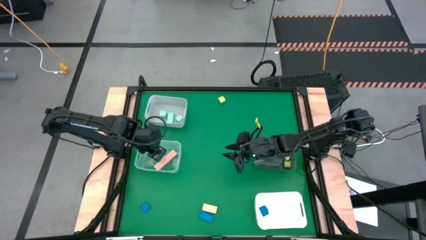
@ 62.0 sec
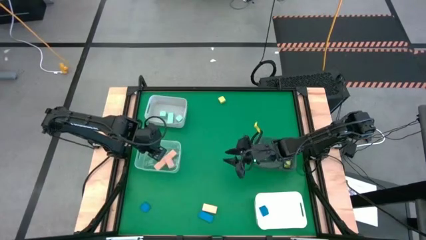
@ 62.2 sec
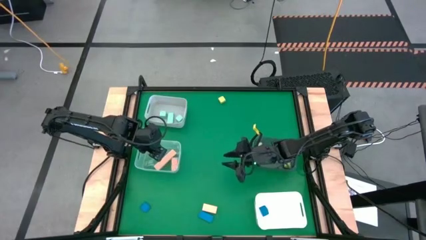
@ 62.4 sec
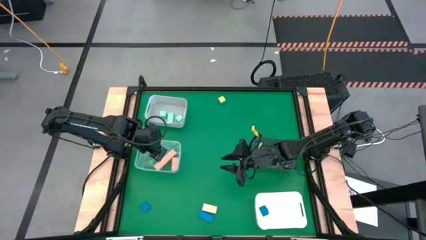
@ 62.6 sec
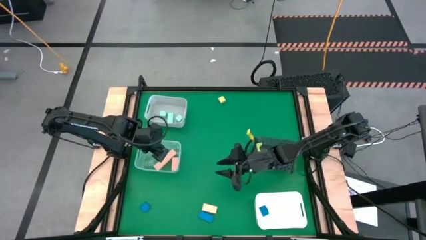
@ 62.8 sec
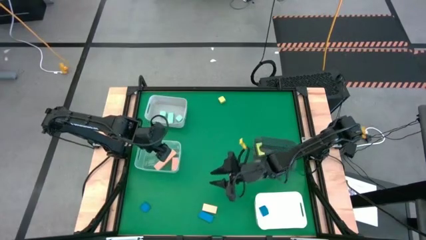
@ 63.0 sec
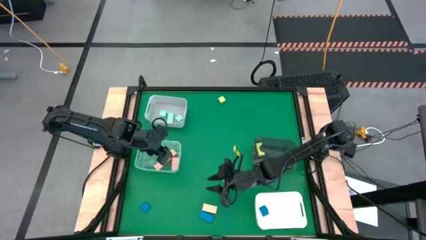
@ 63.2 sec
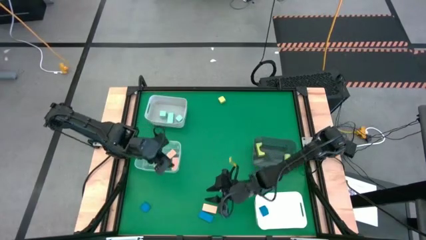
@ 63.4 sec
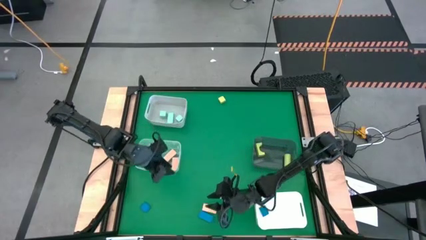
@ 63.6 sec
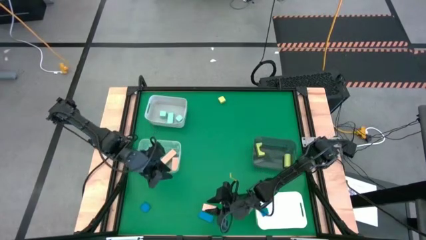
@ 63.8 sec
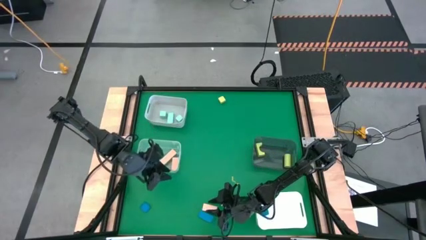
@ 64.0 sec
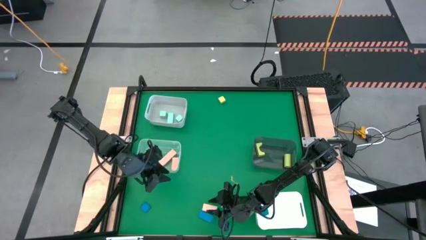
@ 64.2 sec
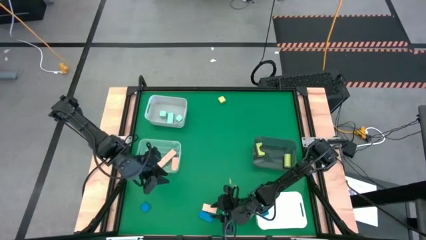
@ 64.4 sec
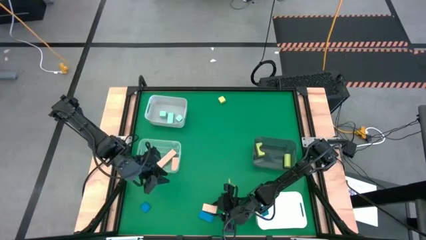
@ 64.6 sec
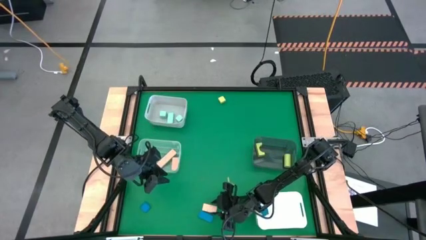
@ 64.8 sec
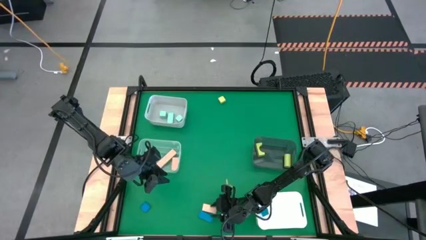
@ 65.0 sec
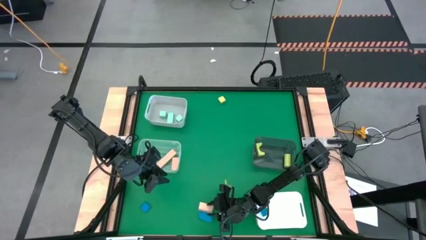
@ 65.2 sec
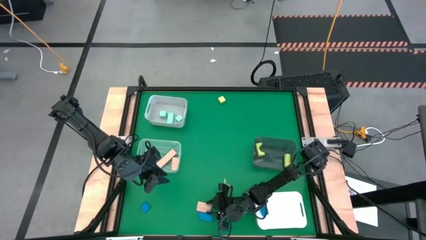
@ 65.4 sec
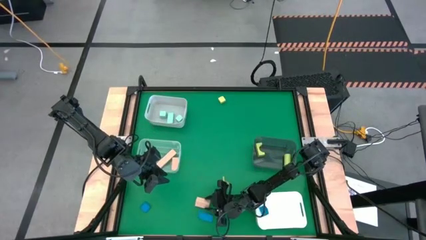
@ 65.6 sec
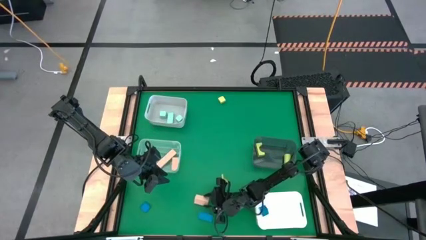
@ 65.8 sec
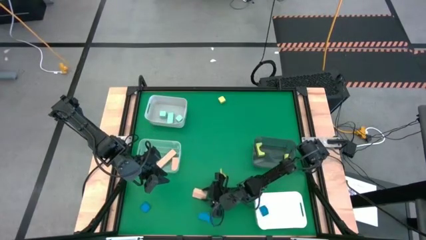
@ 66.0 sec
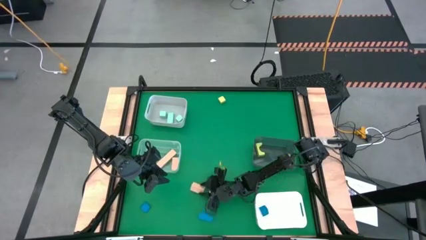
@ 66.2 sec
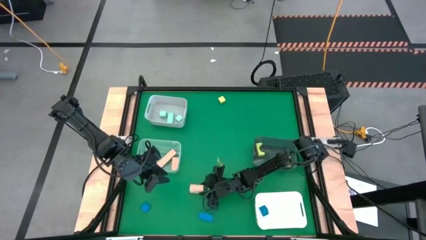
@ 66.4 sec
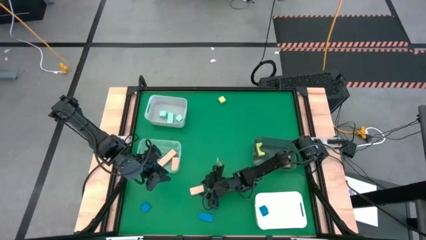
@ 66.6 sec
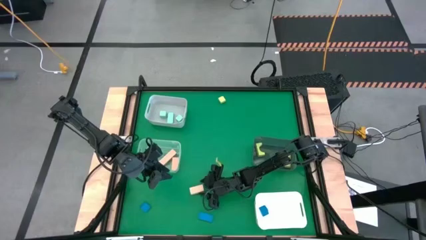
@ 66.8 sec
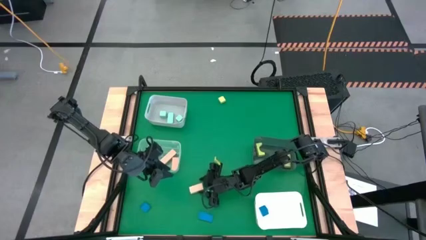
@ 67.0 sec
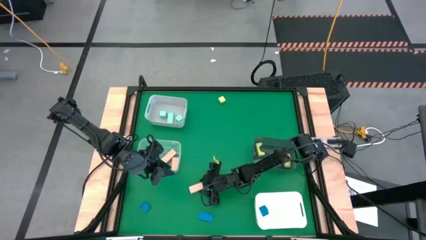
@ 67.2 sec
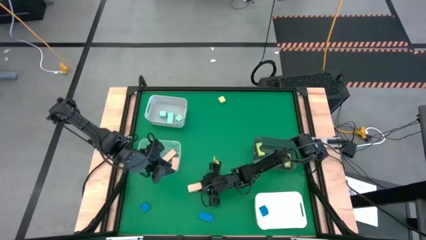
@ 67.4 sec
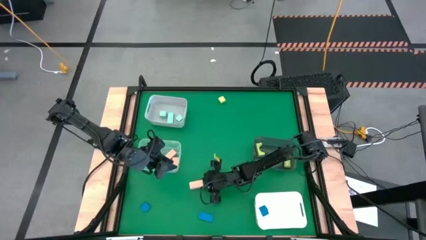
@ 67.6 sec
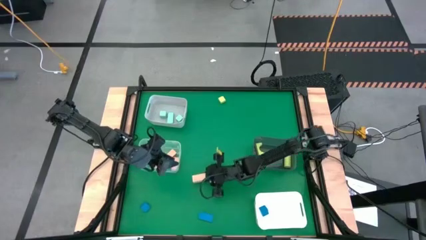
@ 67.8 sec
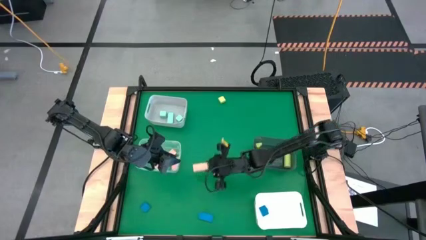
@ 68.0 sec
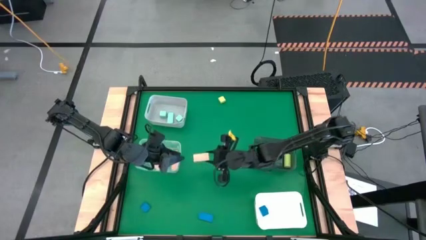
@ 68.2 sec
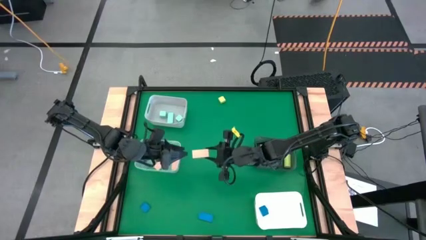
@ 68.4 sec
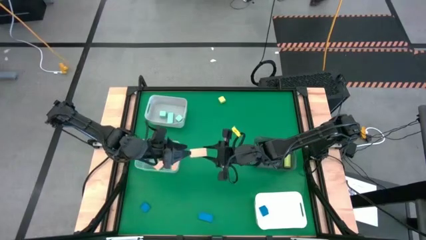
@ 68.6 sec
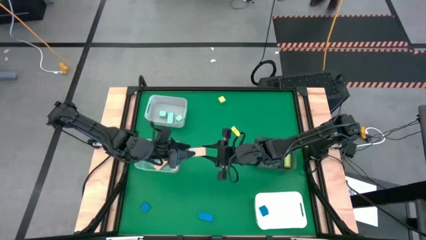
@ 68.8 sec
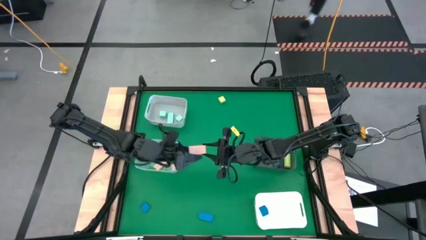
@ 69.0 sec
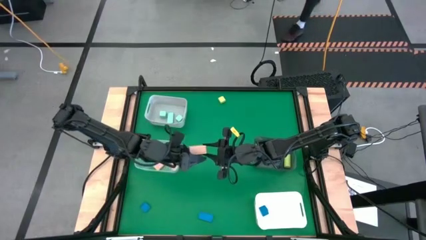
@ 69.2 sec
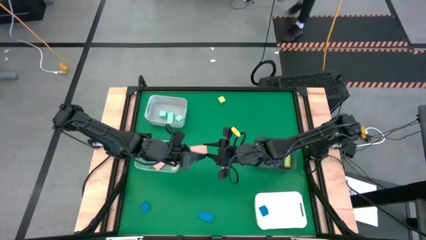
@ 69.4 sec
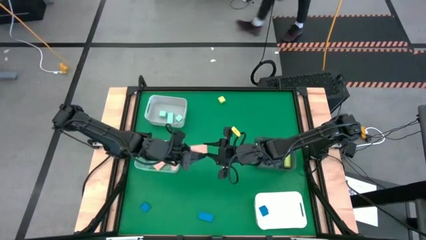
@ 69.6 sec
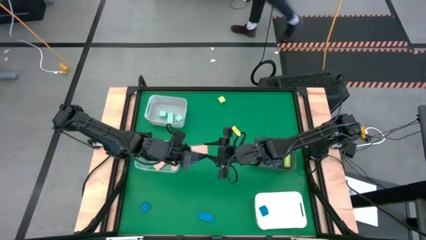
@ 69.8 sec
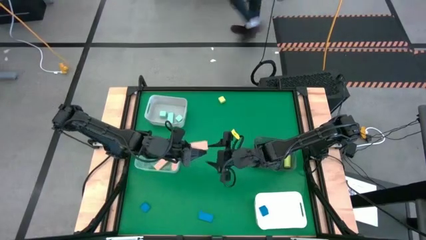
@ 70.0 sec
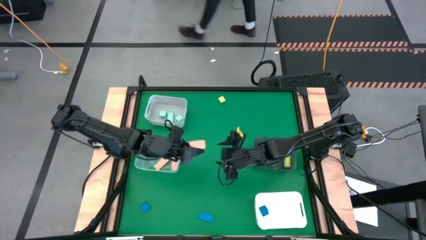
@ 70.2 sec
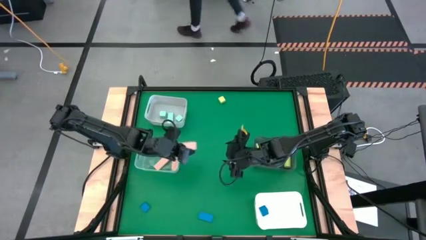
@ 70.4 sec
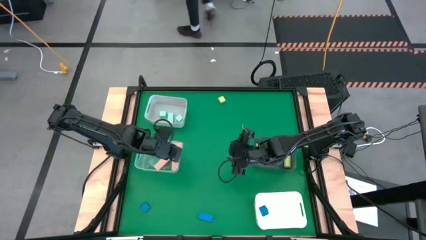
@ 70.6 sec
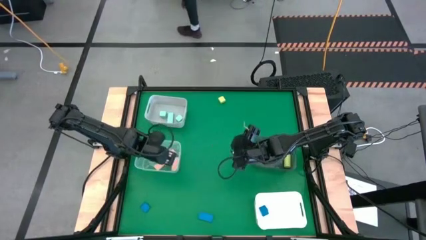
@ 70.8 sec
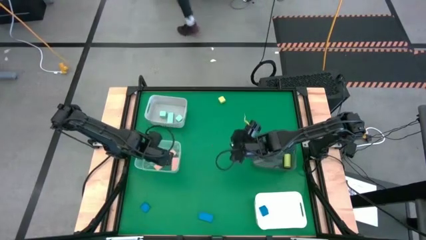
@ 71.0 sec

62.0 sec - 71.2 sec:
Task: Sort & place blocks by color
Put the brown block into the transparent bin

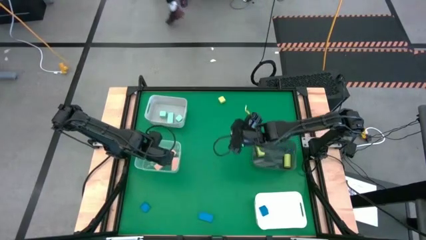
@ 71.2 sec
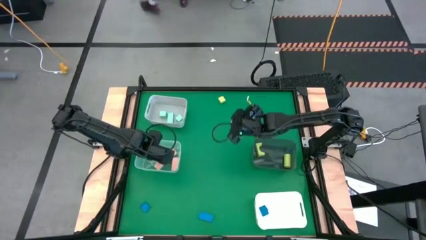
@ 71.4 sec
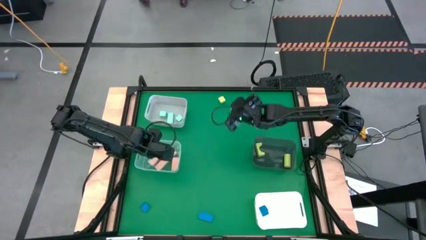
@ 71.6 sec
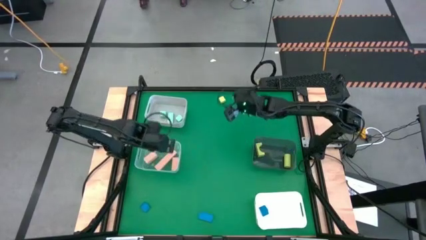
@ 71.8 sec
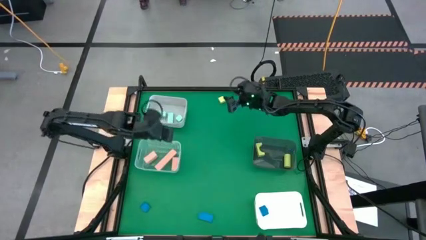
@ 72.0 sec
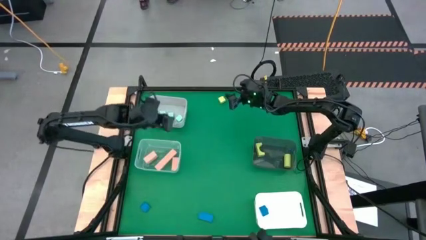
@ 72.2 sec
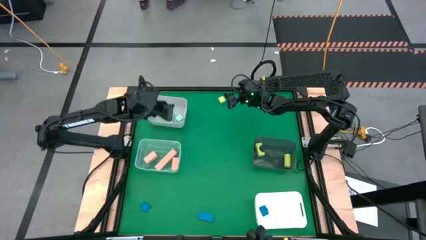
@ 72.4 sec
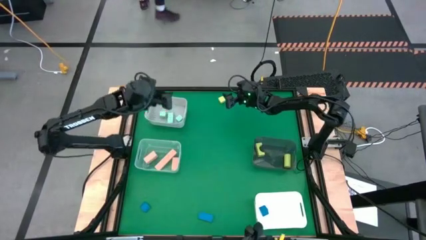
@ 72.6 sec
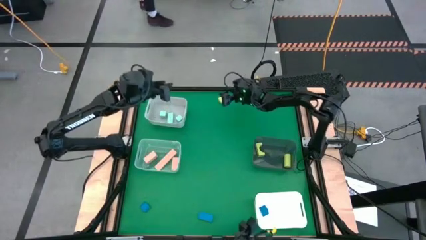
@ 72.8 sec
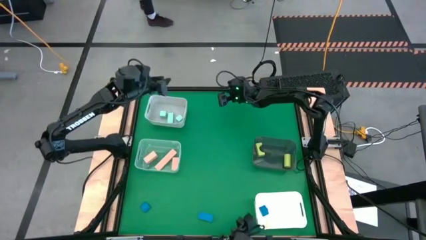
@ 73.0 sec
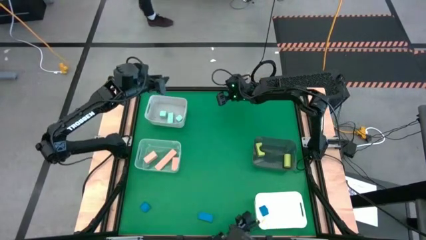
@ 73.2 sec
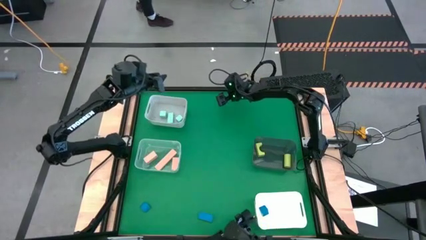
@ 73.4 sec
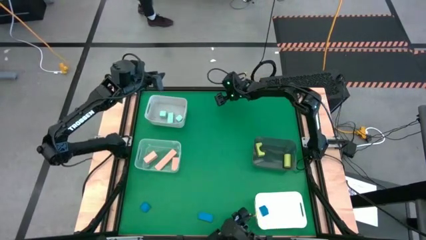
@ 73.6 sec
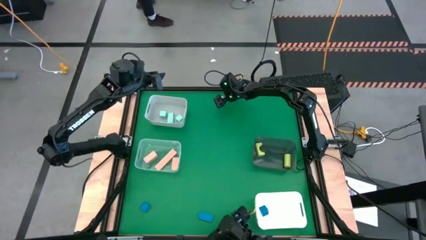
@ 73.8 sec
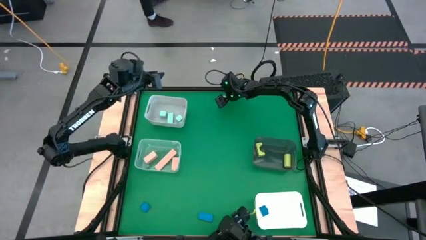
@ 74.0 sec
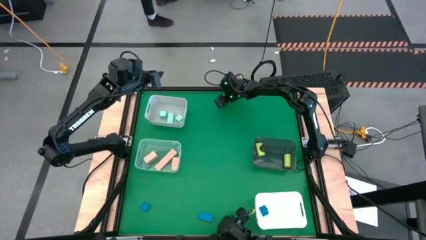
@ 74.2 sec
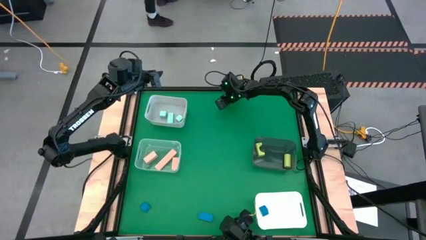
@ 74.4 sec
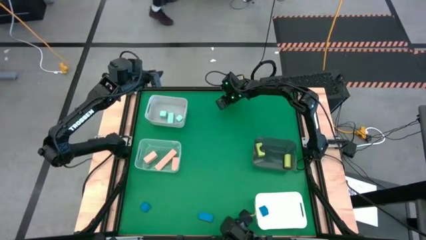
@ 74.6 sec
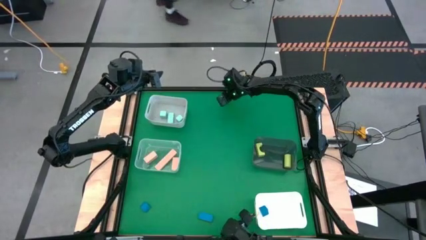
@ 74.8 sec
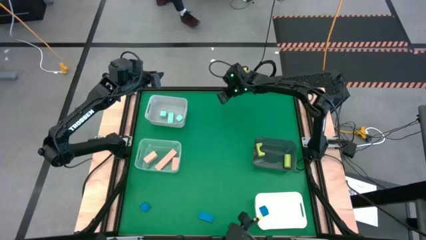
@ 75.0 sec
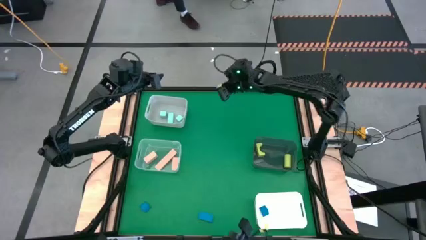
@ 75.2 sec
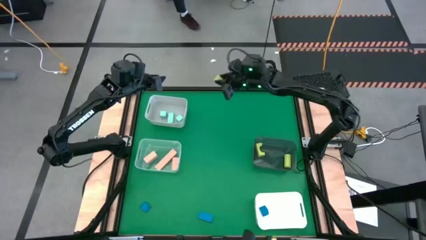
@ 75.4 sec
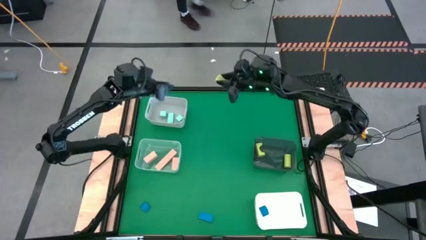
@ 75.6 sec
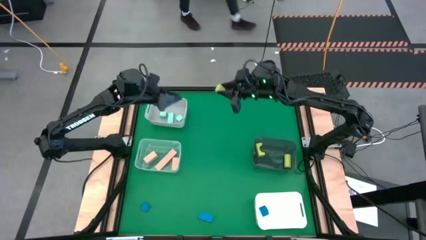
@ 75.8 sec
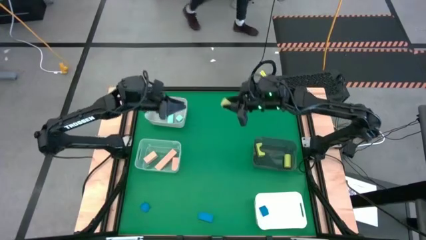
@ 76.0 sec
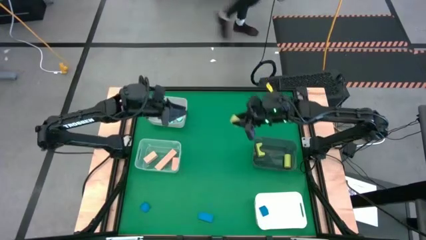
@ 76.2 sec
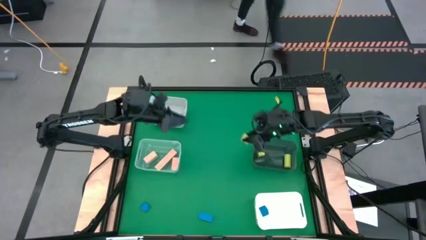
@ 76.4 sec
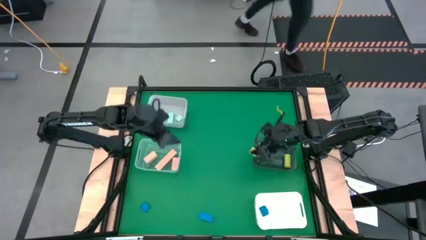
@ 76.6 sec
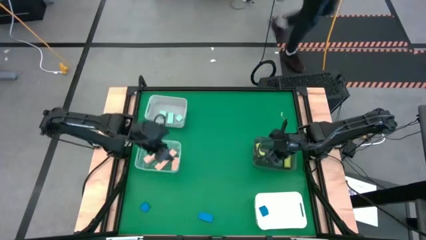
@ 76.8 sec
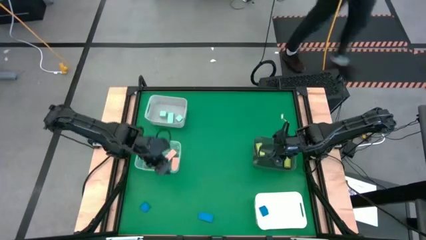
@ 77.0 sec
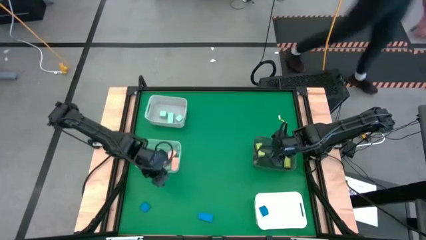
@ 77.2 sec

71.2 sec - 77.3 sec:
Put the green block into the black bin

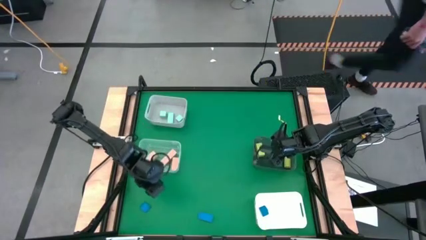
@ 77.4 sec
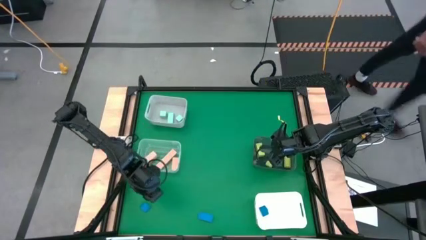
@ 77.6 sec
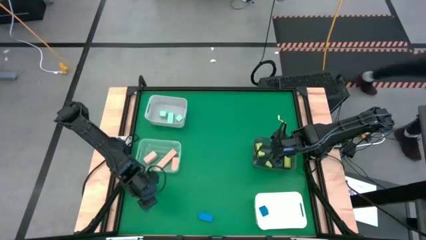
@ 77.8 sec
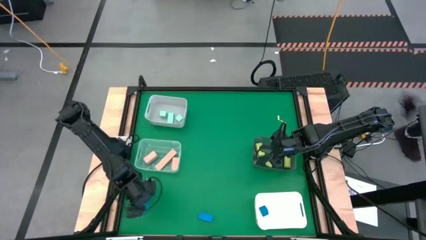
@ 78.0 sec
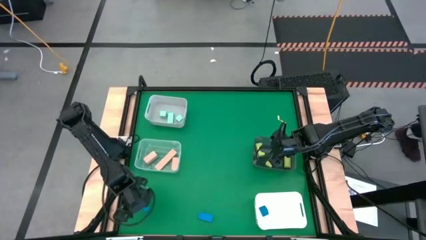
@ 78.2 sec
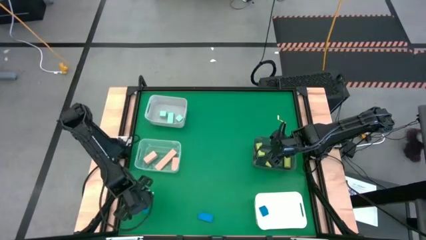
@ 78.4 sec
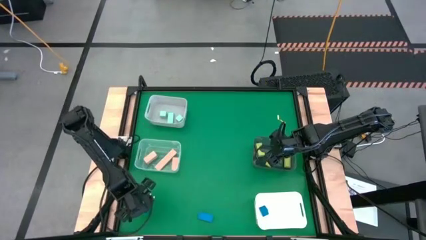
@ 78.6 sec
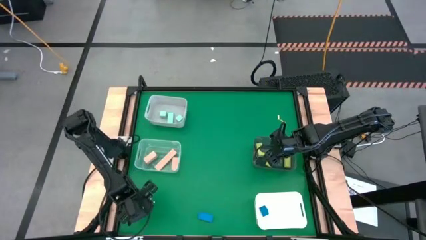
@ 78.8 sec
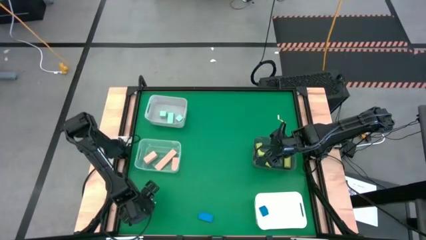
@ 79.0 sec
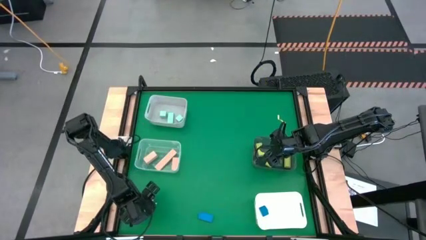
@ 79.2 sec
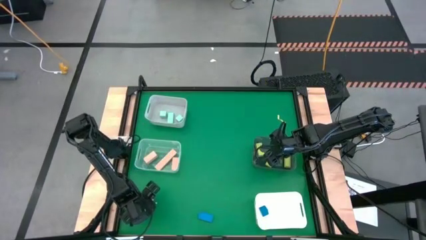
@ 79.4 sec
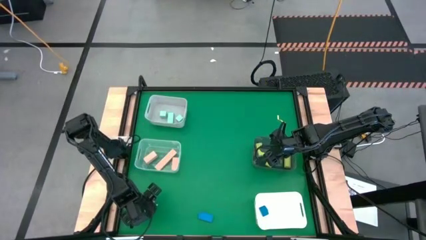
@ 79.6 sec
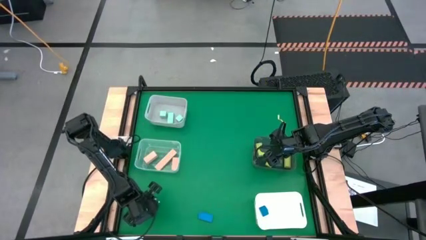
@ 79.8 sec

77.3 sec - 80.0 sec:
Put the left blue block into the white bin
